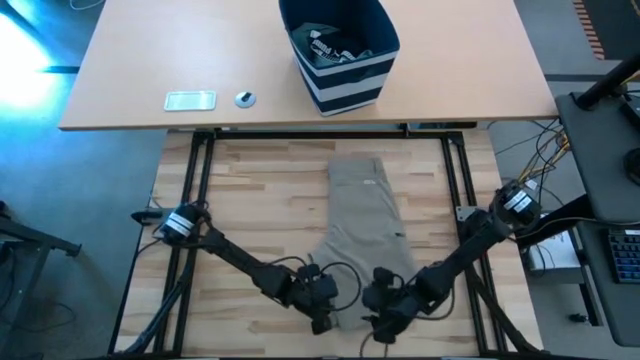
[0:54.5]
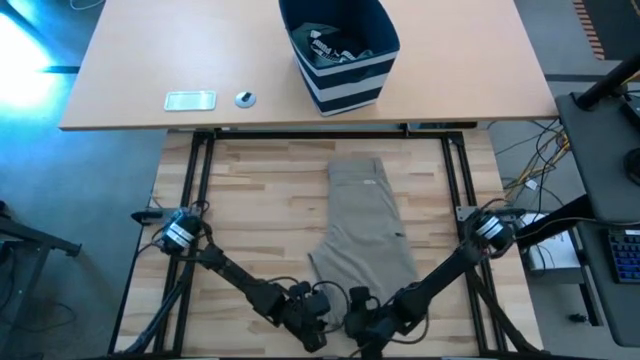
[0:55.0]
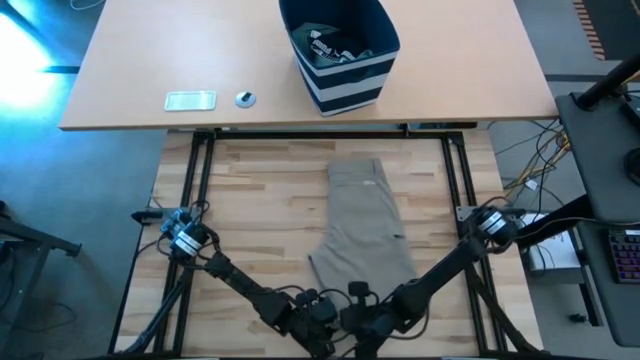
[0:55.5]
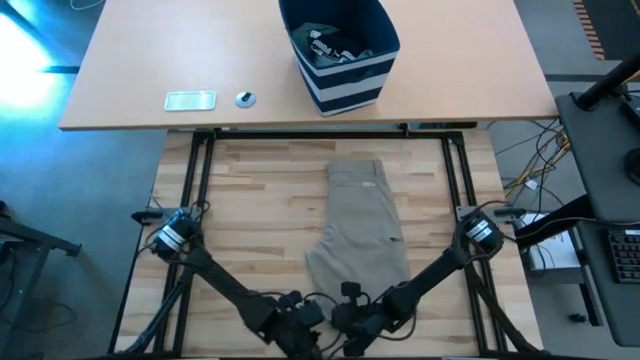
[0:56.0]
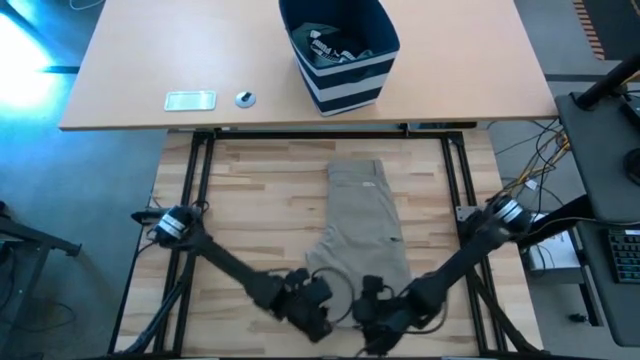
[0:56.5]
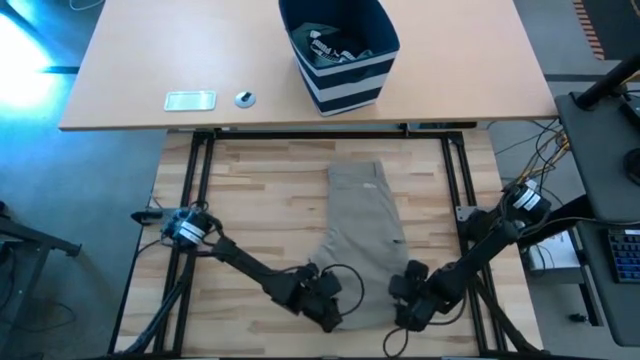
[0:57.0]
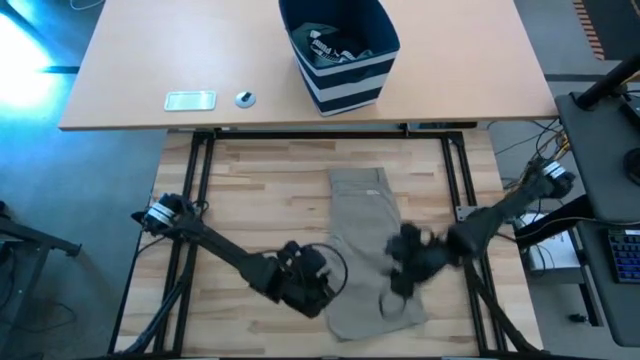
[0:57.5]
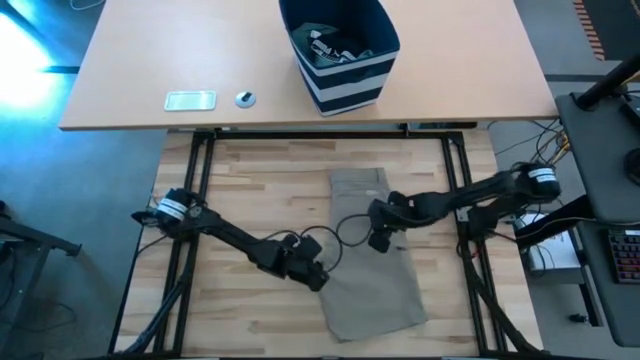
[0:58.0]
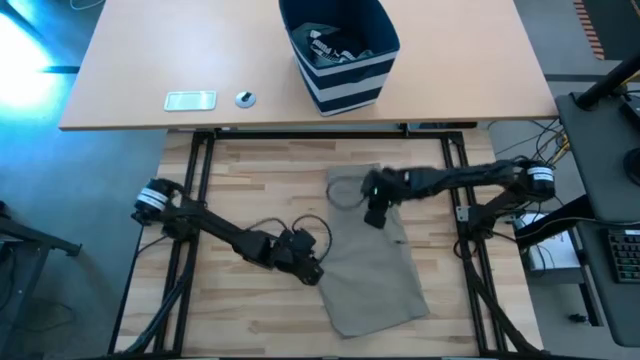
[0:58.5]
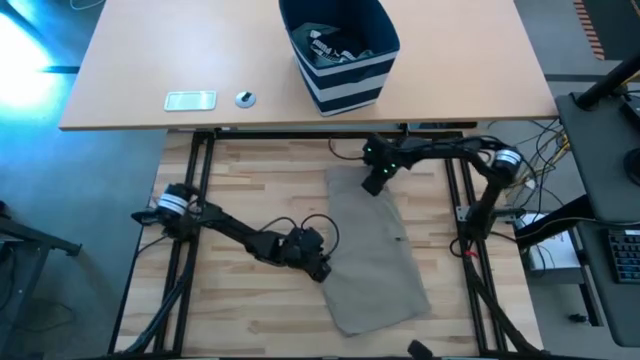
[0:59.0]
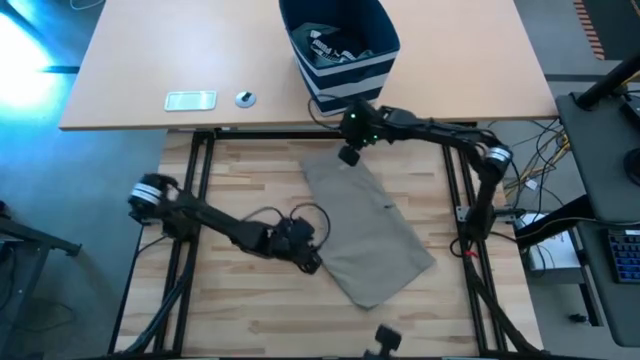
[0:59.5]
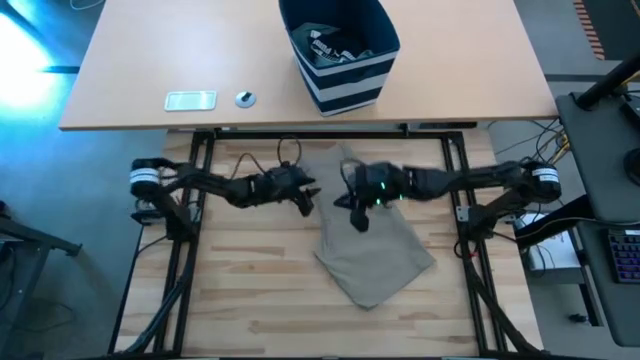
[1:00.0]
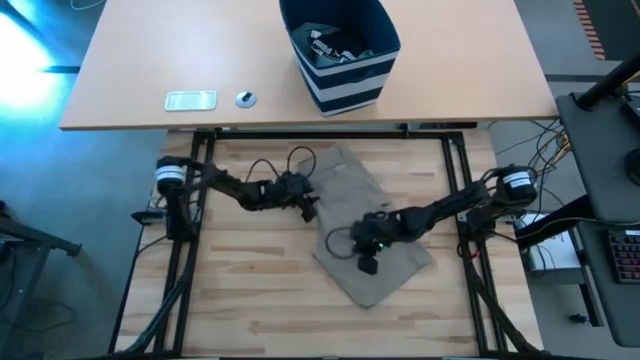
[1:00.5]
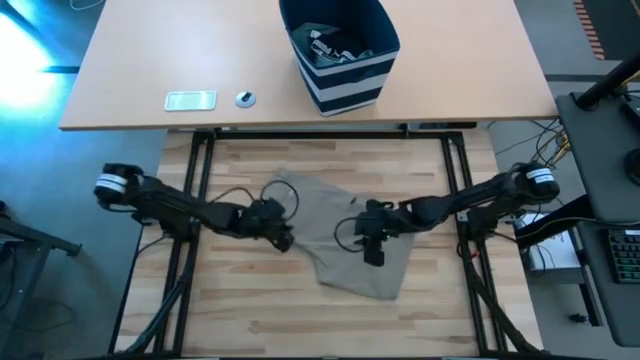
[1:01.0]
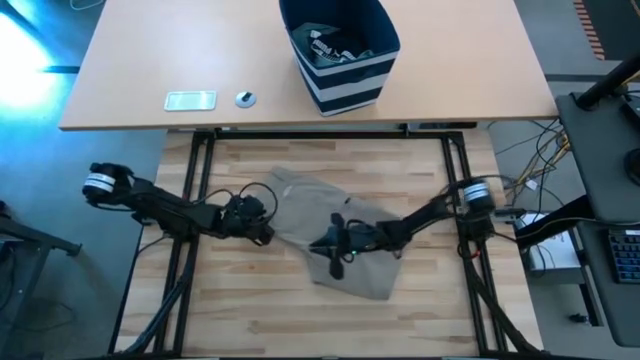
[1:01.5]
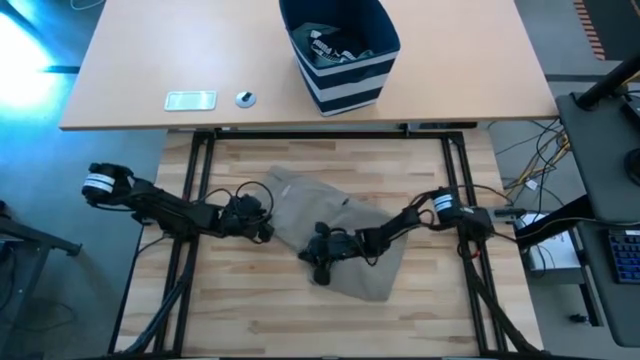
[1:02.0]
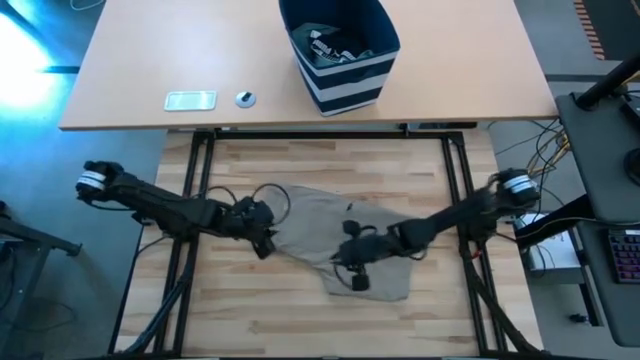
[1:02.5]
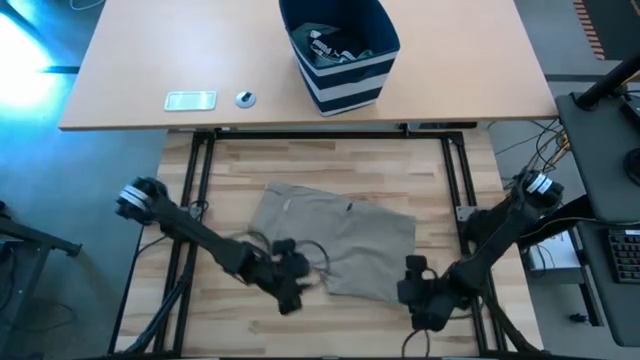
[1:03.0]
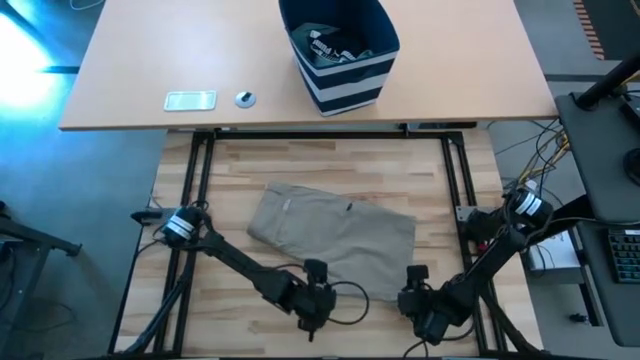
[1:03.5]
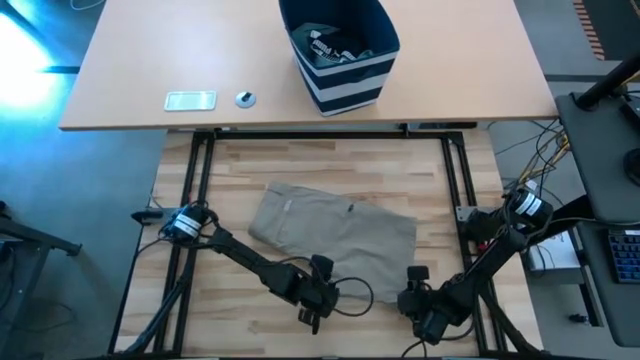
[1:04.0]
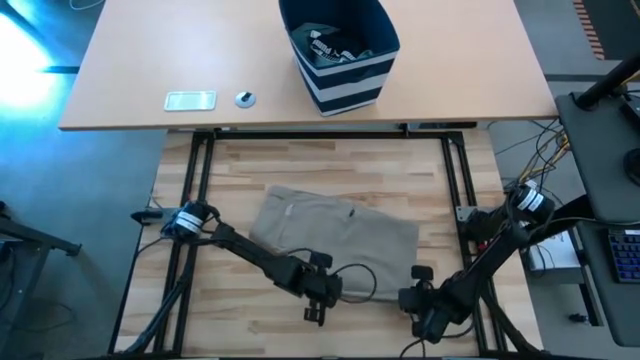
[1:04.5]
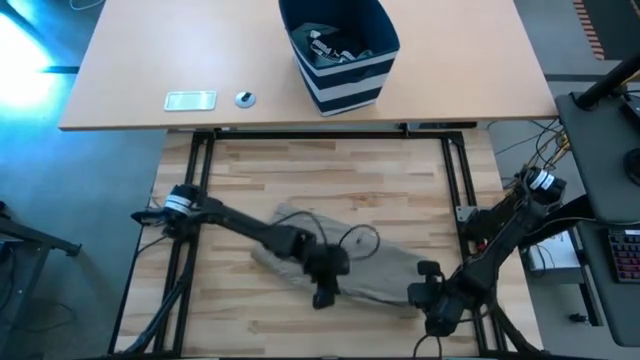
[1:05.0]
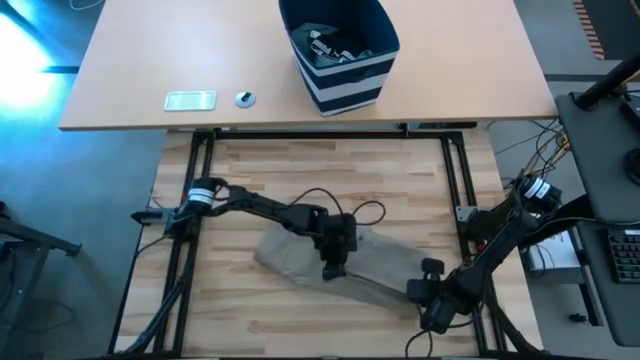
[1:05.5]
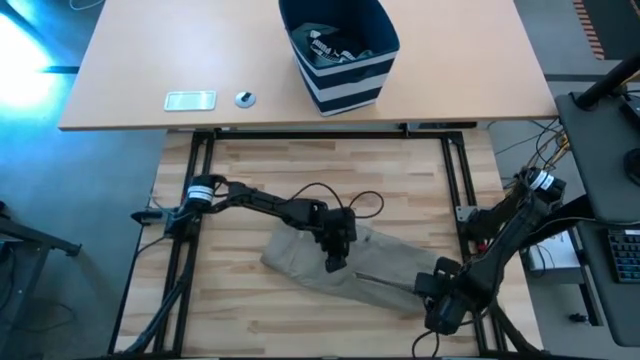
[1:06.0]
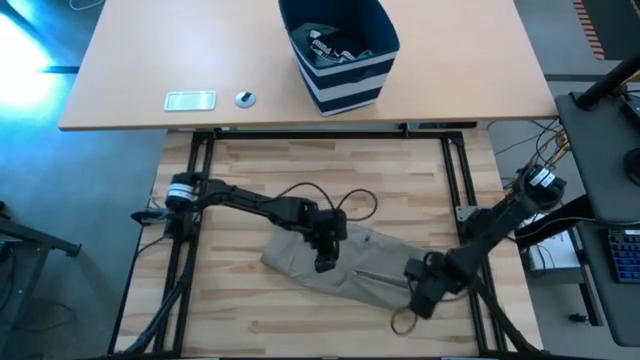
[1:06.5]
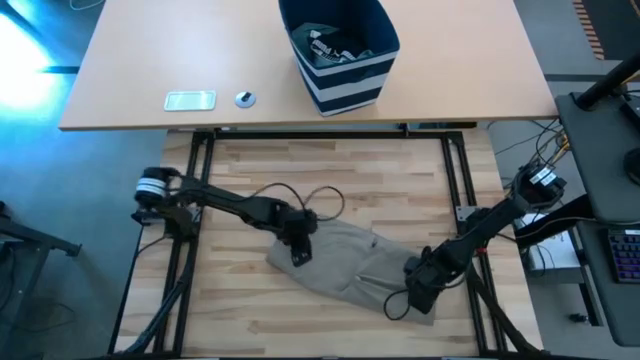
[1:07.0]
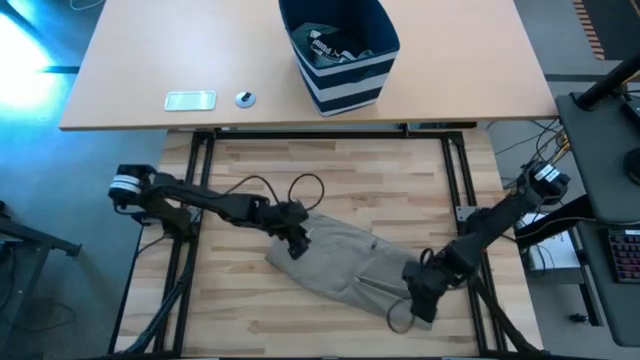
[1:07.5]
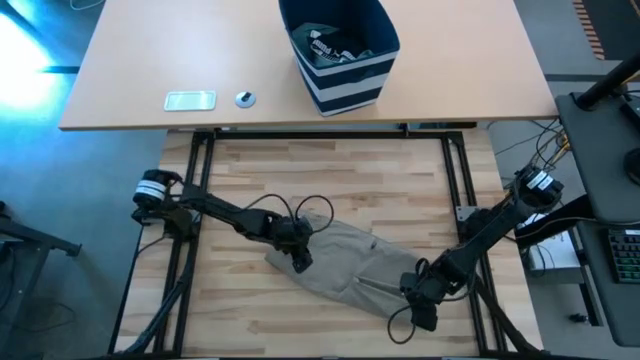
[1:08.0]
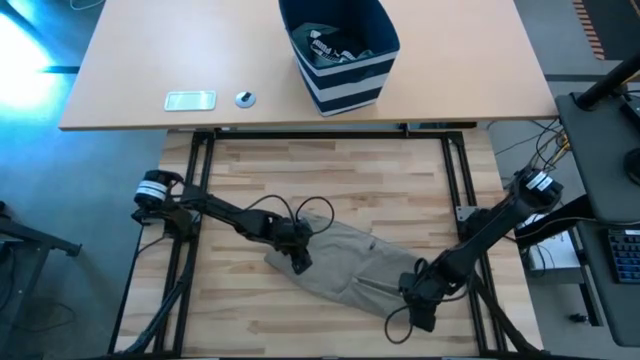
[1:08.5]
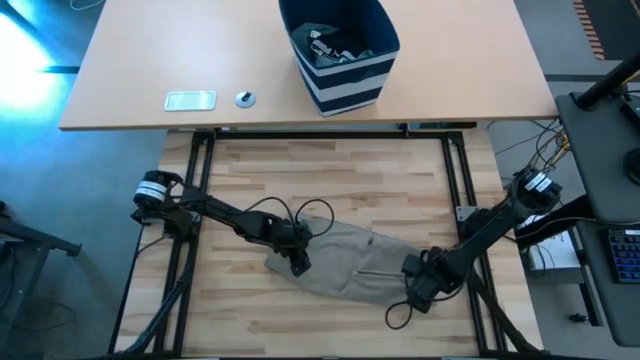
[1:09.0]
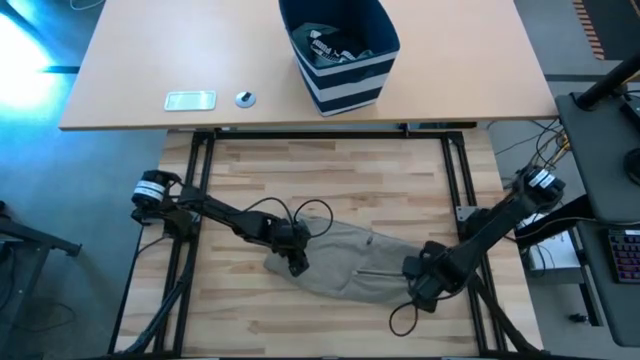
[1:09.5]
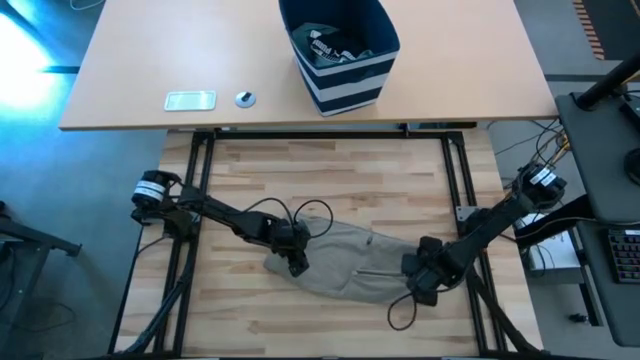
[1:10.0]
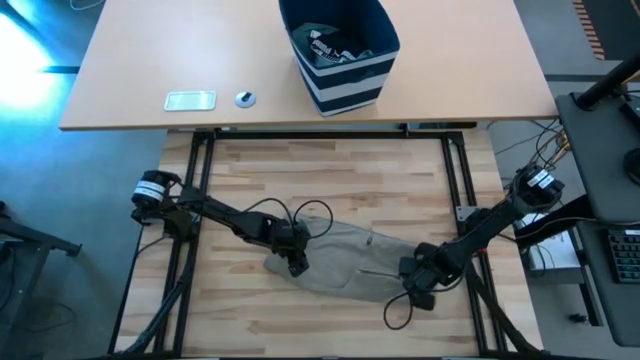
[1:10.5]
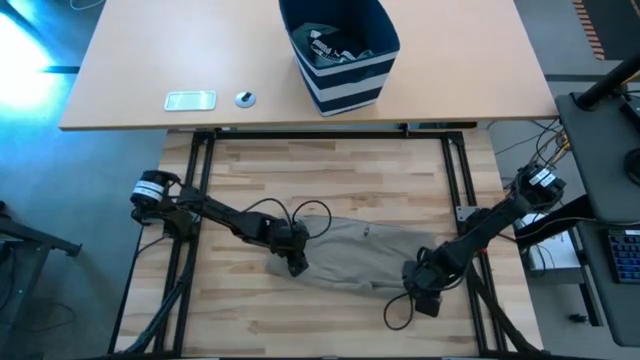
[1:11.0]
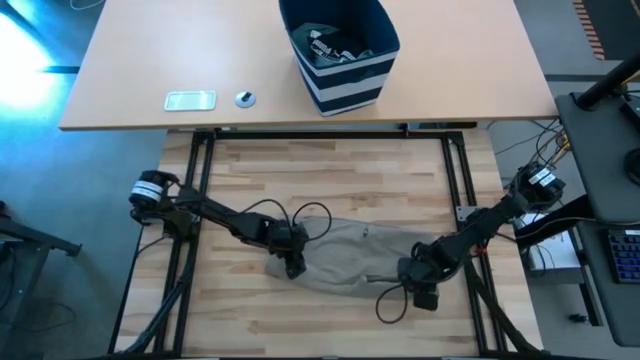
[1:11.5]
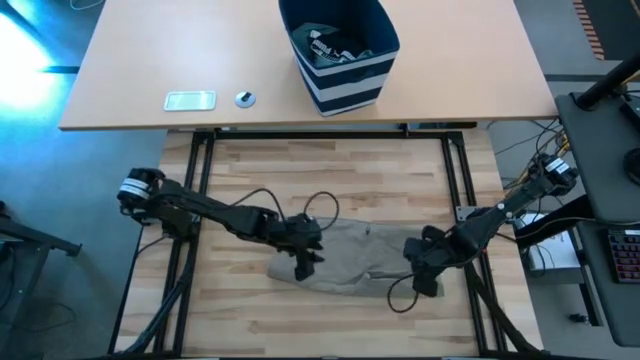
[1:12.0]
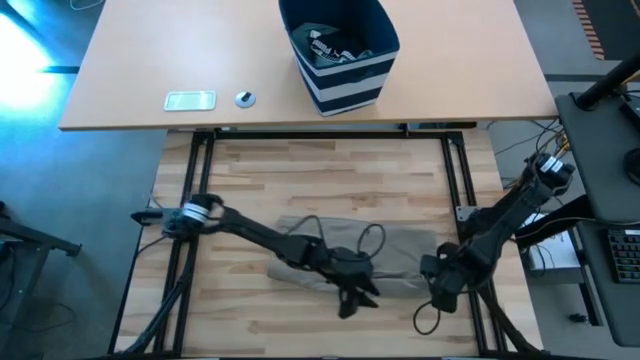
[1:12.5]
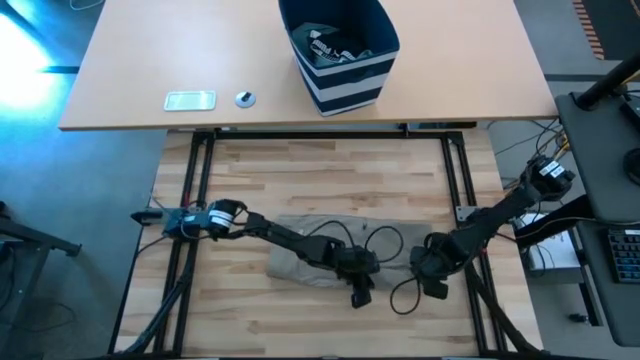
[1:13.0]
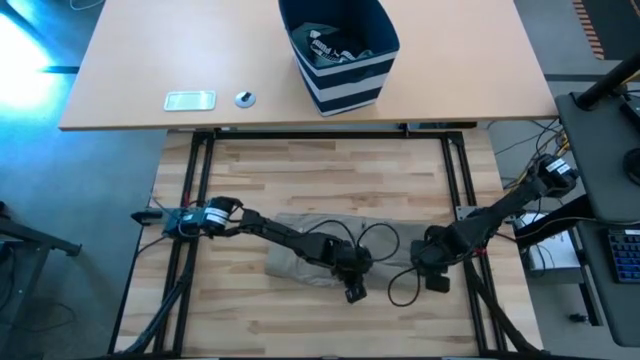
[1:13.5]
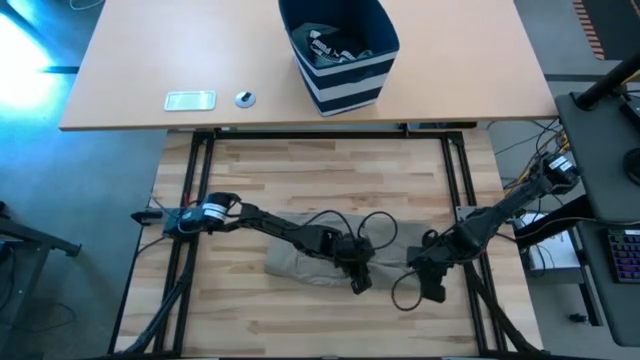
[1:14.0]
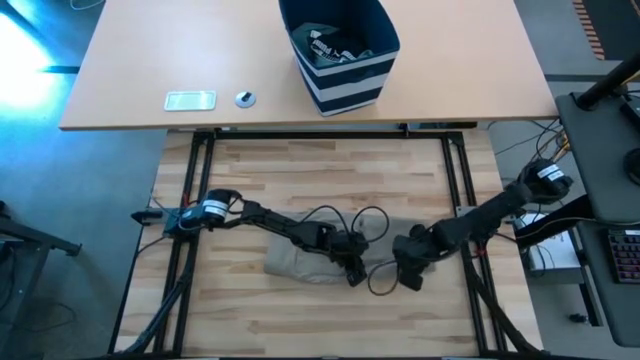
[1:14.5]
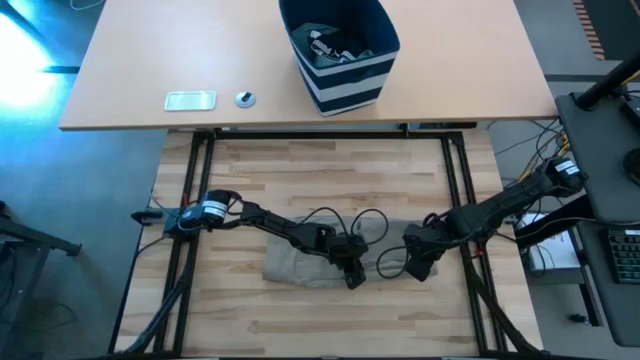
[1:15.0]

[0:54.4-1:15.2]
Task: Fold Laundry from Bin
Fold the brown shorts
